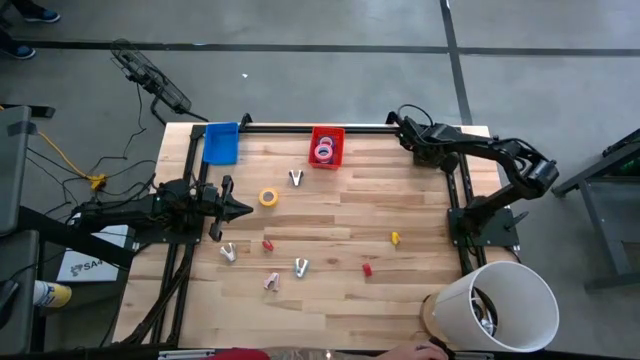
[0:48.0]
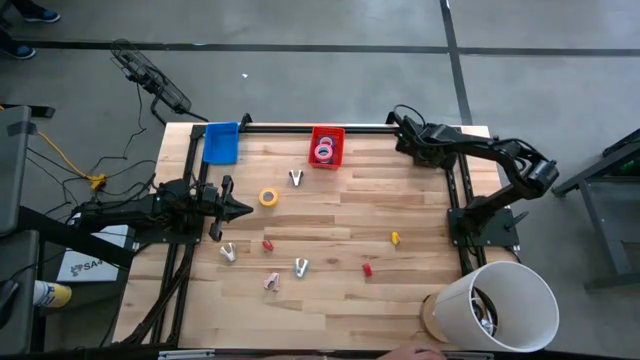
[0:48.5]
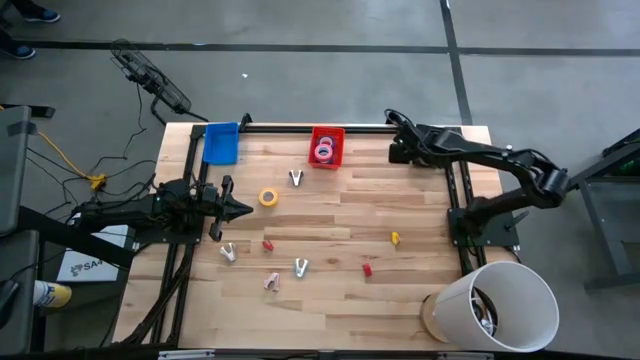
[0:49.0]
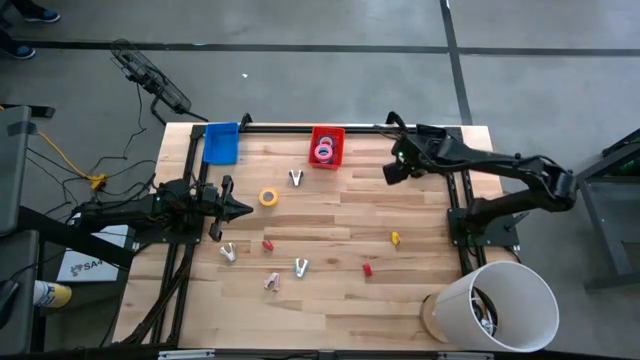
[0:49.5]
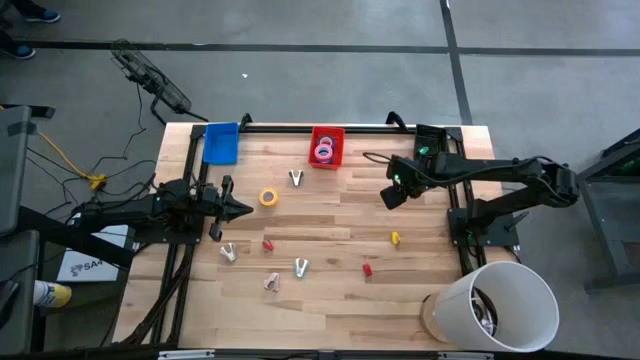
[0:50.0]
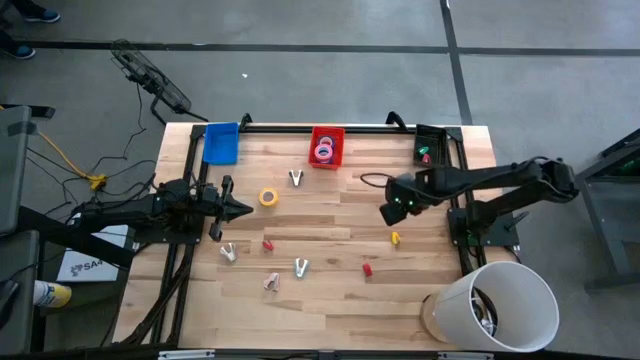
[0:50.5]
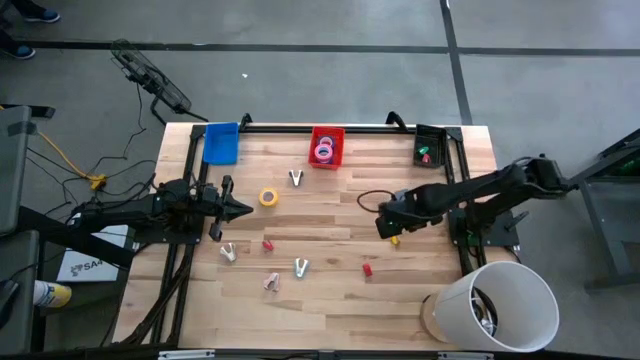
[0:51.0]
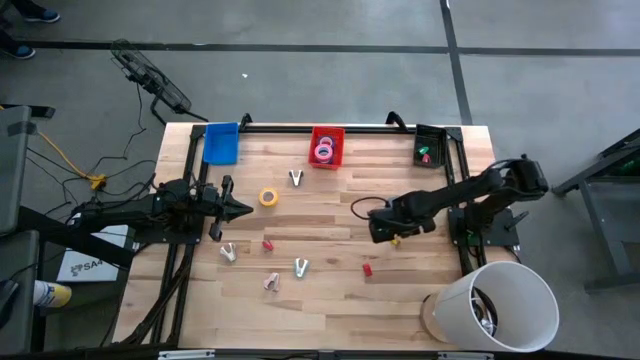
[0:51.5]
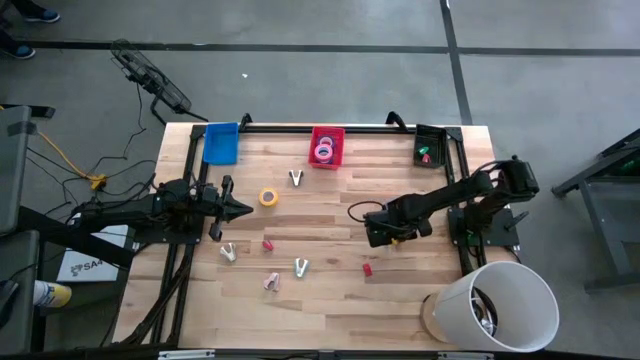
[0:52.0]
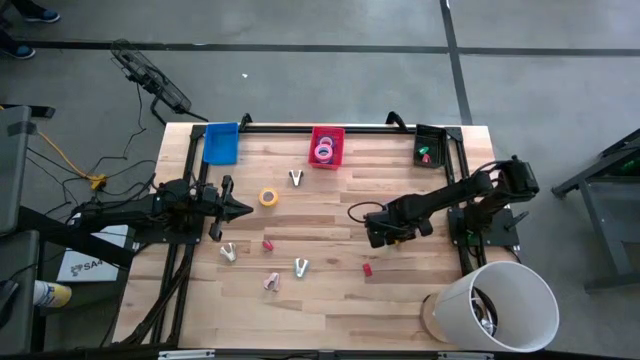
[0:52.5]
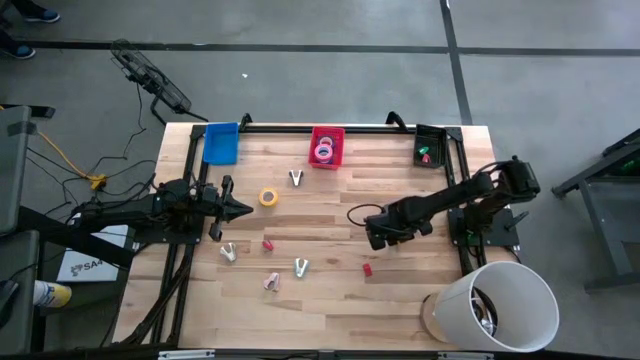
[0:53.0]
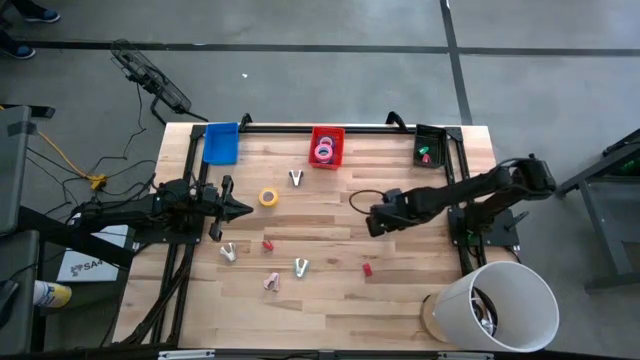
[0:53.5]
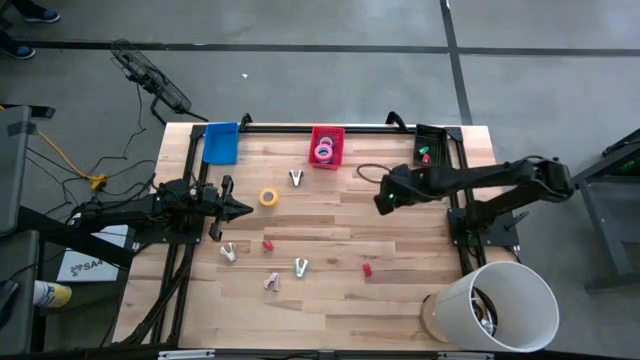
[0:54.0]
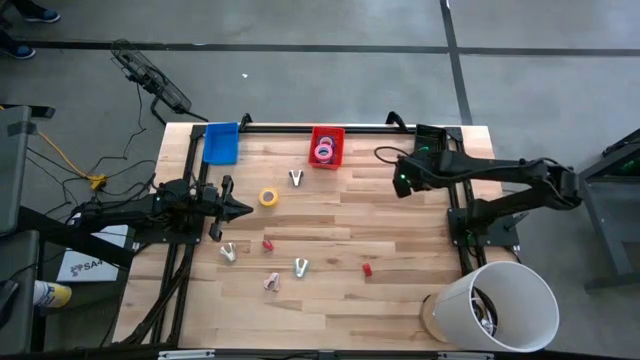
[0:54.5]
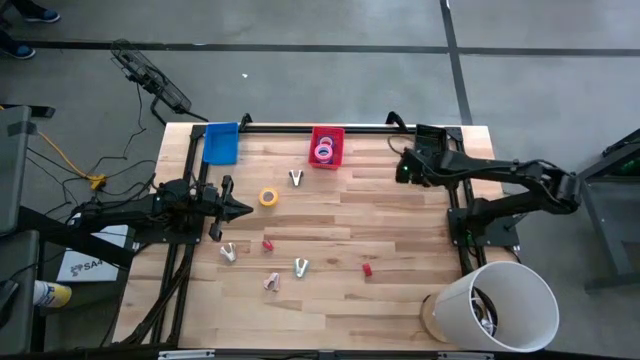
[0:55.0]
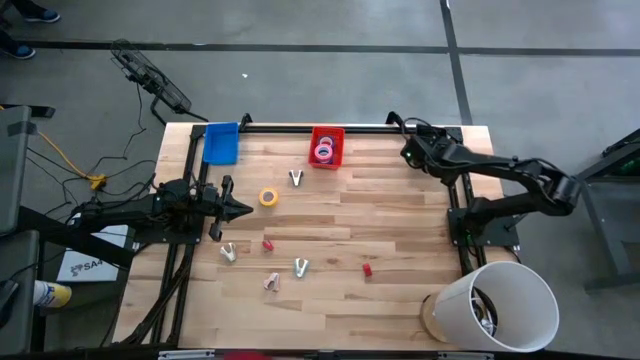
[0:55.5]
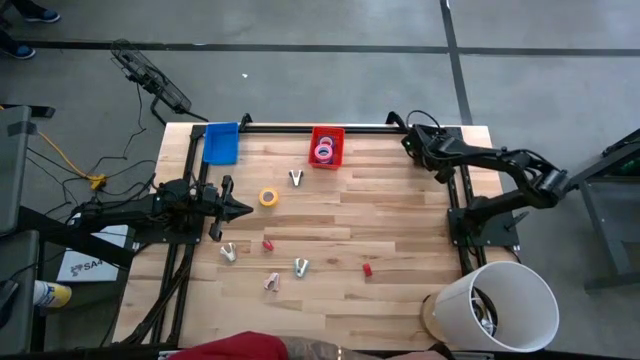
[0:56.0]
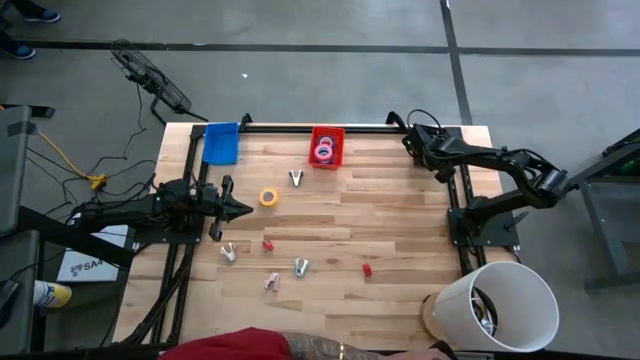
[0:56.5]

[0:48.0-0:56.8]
Task: Pick and place Stapler, Stapler remover, tape
Put the yellow stapler into the black bin

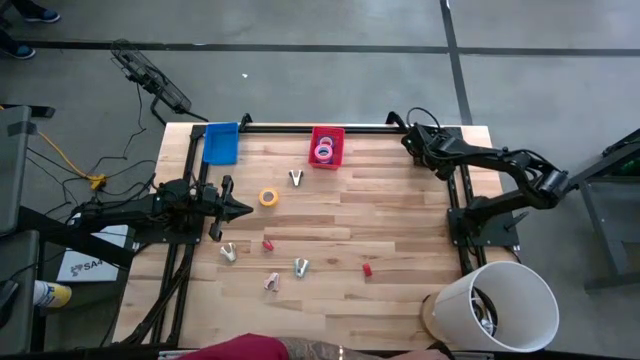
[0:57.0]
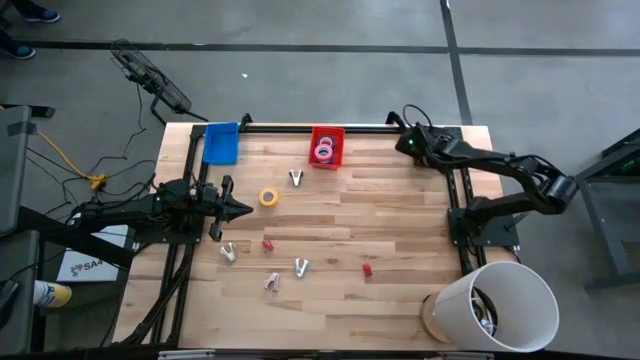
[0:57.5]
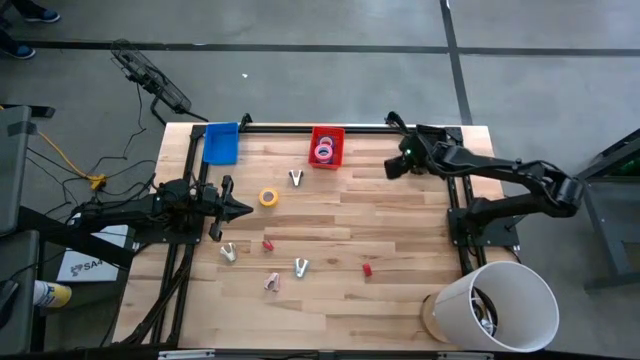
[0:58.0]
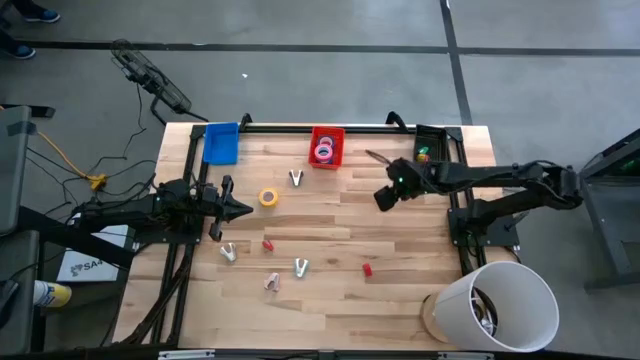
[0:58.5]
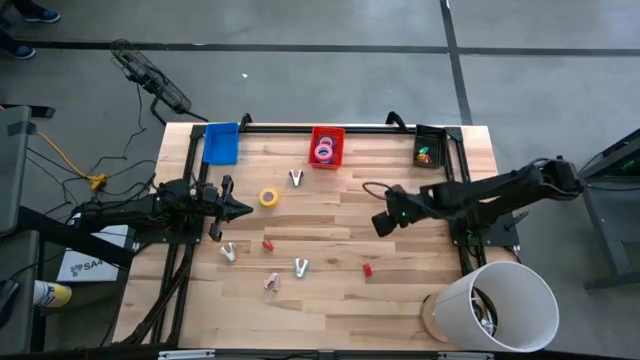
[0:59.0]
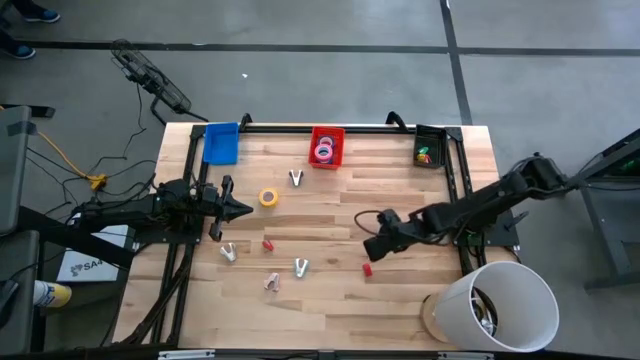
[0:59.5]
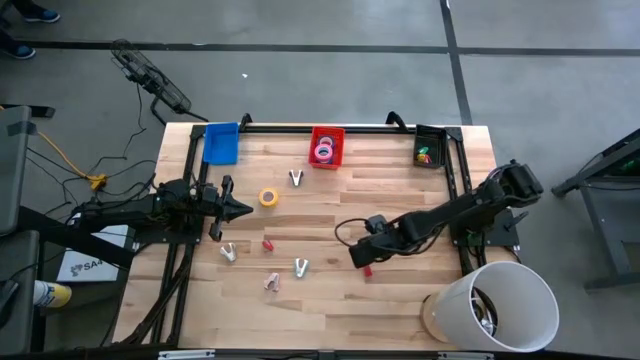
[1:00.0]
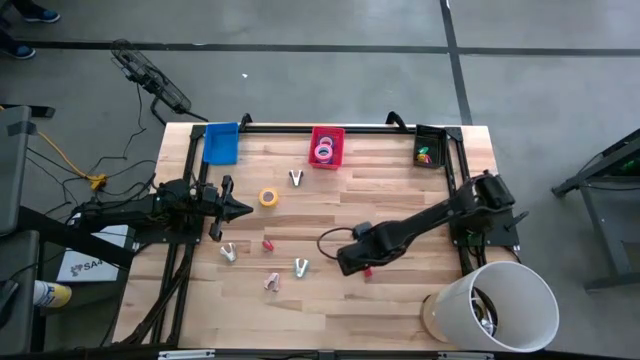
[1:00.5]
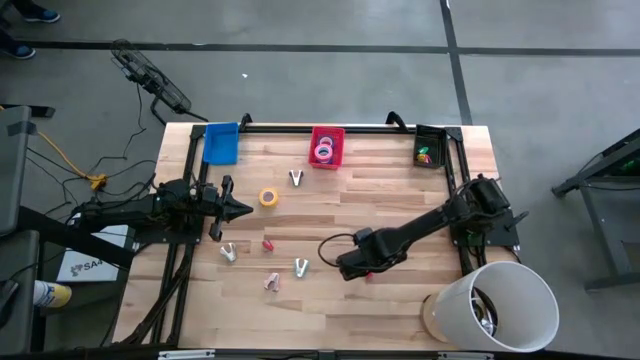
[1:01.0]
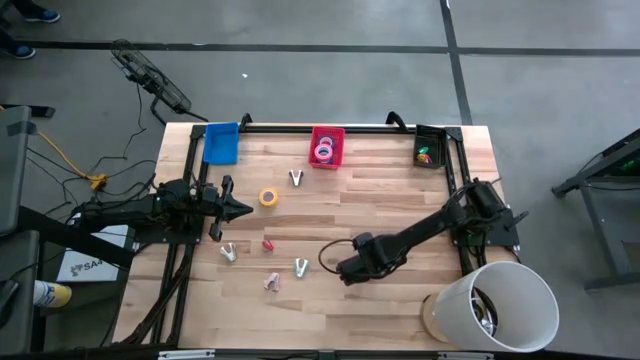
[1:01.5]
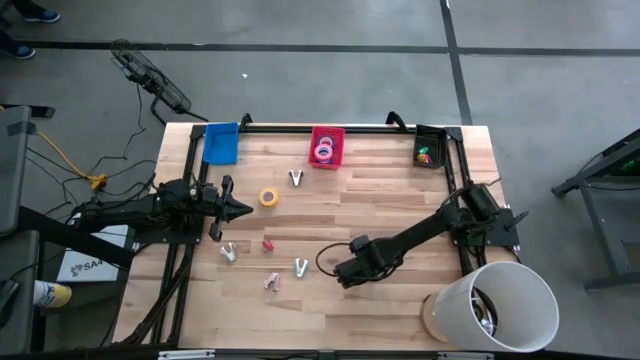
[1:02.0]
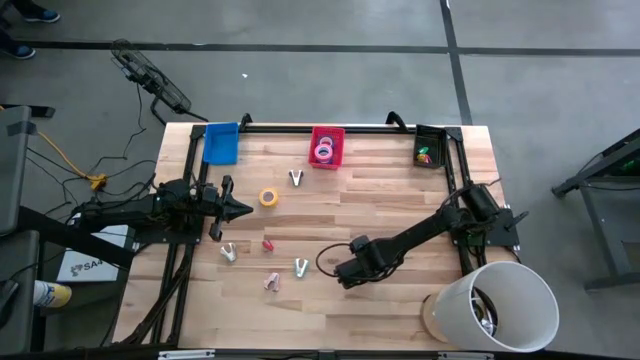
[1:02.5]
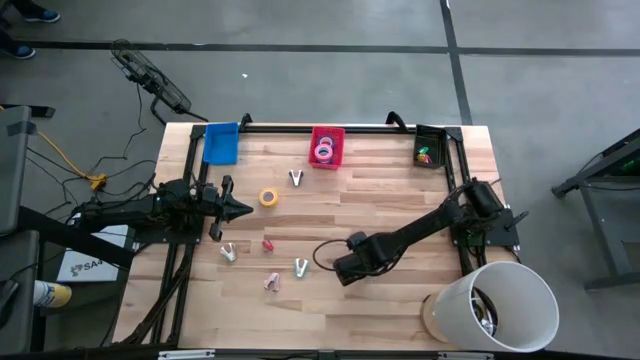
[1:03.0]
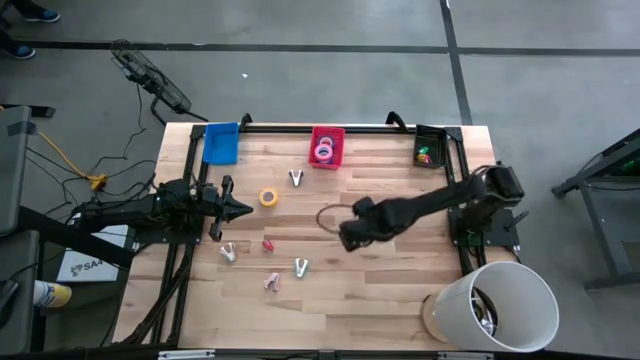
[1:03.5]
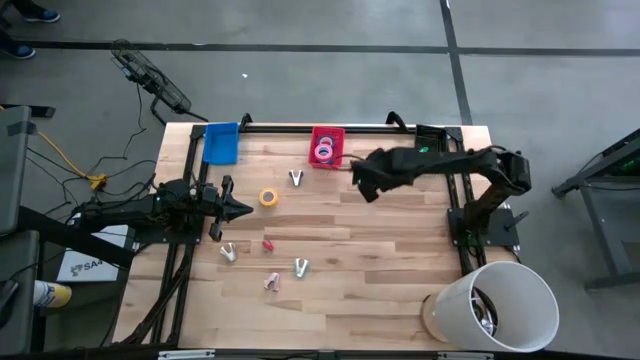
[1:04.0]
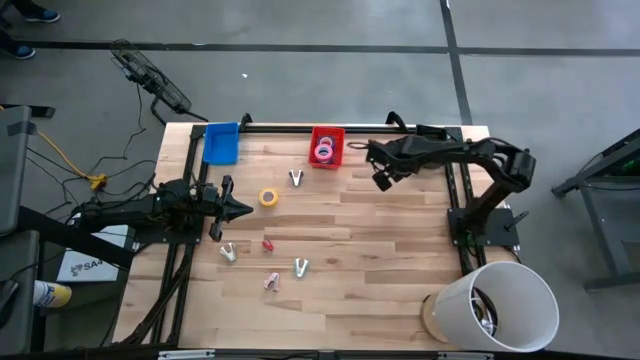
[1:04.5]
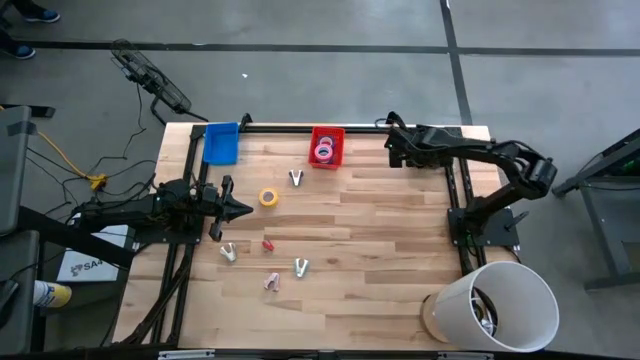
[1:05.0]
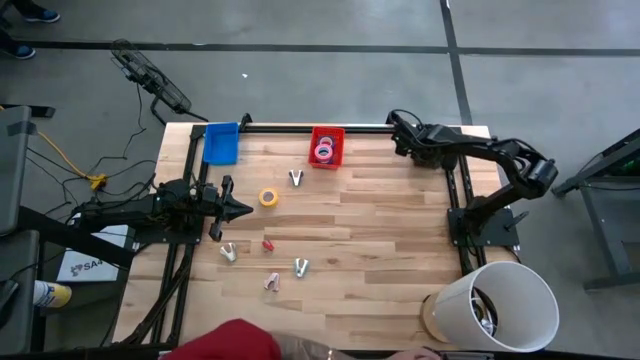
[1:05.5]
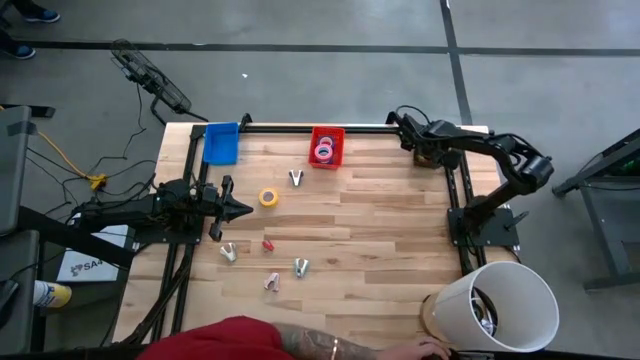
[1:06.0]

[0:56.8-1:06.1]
Put the right red stapler into the black bin

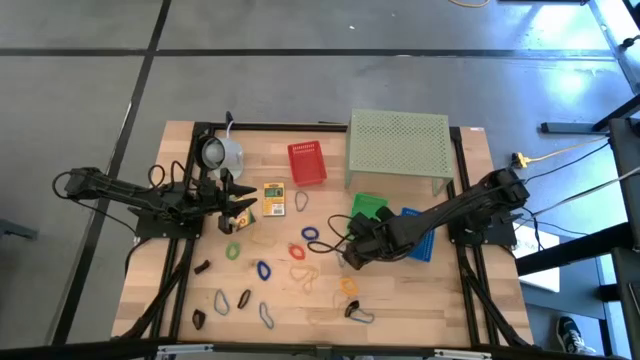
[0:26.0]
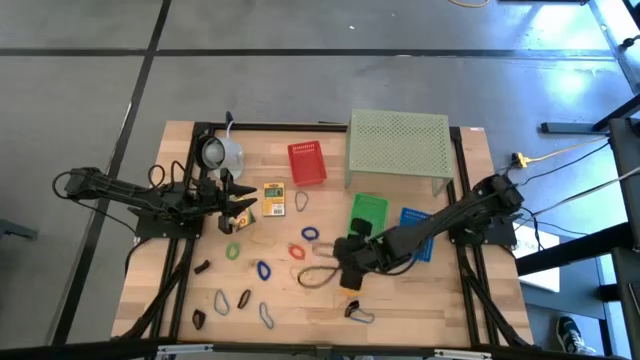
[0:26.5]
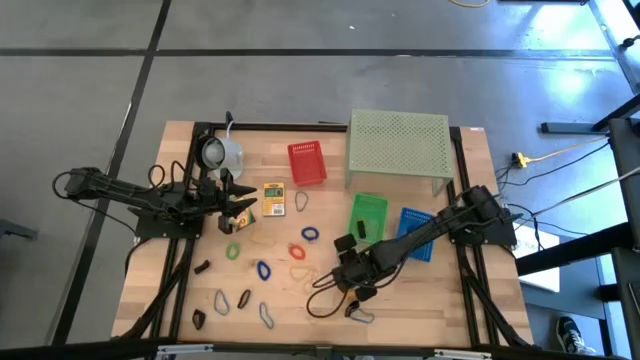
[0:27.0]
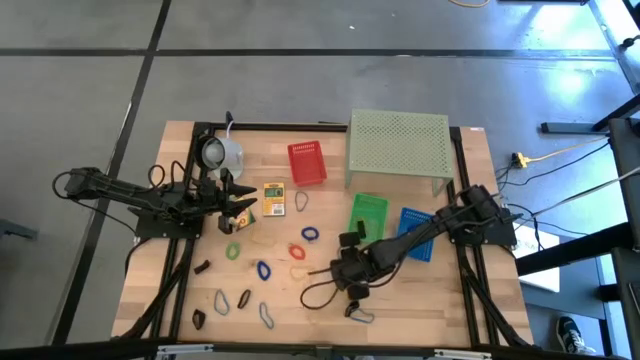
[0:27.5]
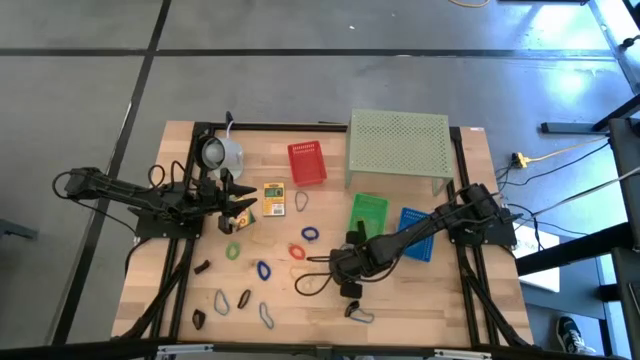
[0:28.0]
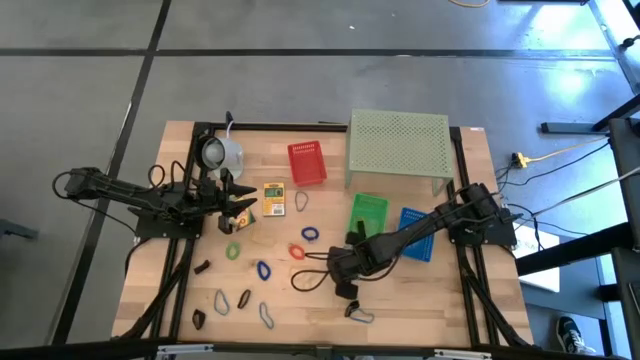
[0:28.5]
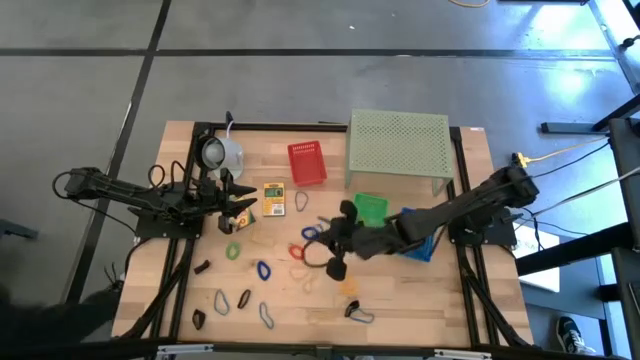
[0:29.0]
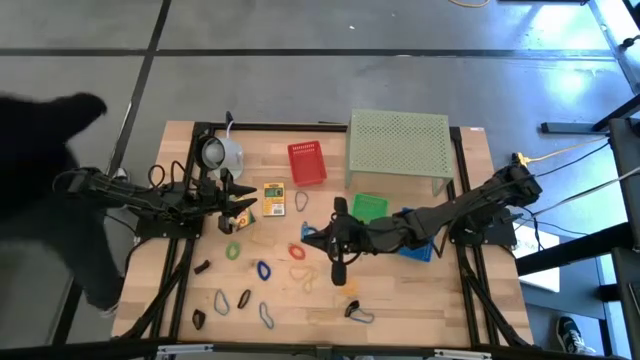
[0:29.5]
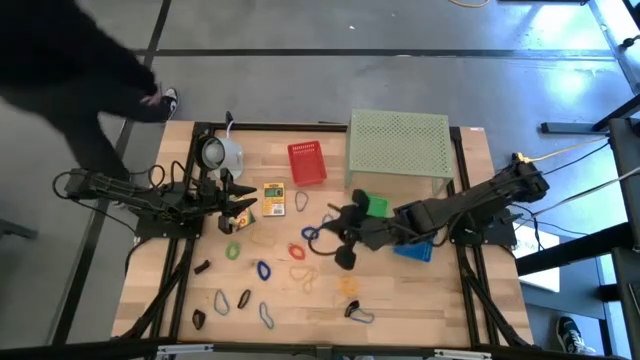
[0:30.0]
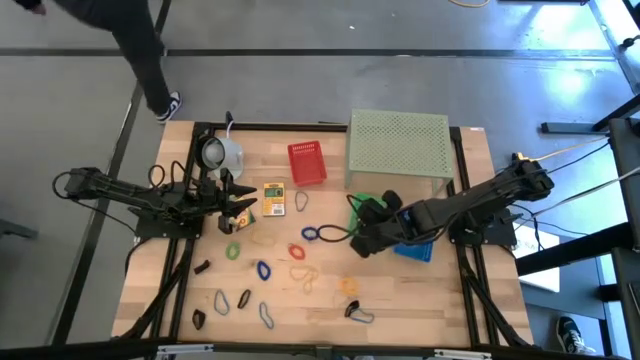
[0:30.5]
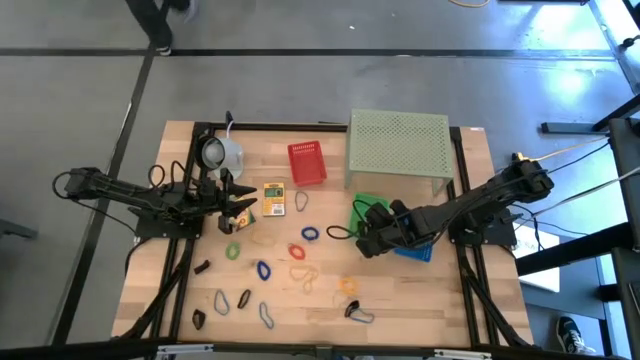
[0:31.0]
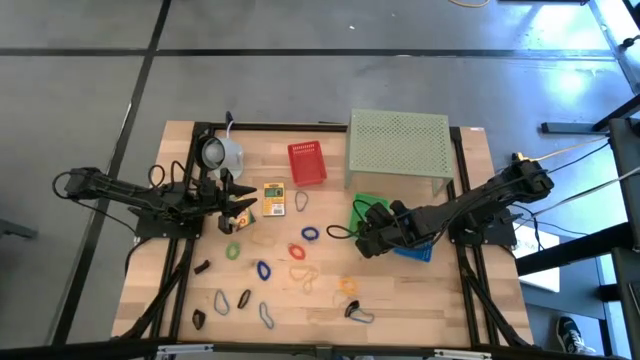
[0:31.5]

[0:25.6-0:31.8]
Task: Pick & Place Office Desk Supplies
Put the blue rubber band into the green bin
